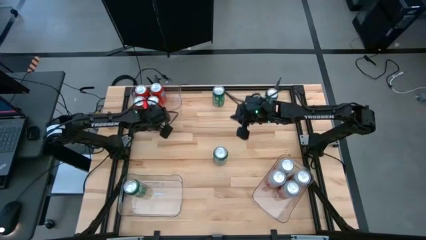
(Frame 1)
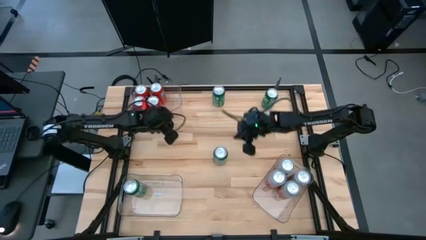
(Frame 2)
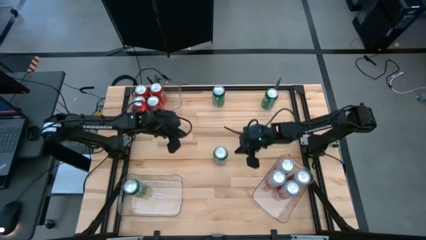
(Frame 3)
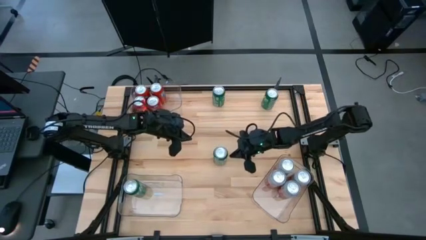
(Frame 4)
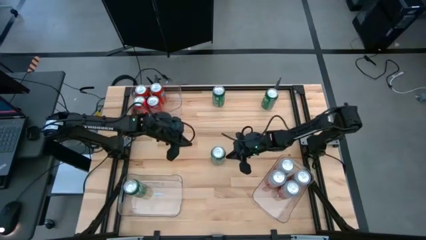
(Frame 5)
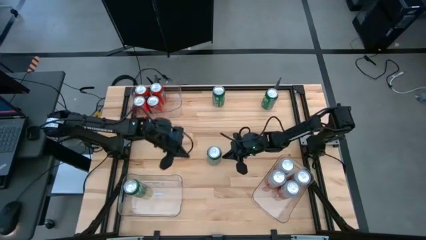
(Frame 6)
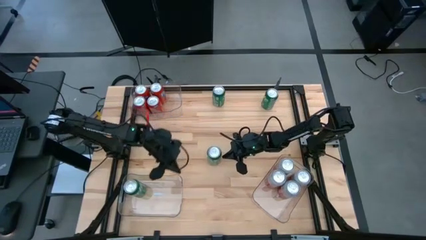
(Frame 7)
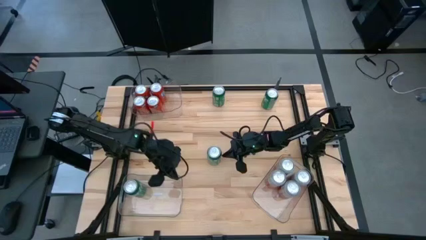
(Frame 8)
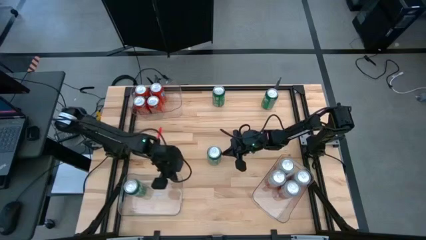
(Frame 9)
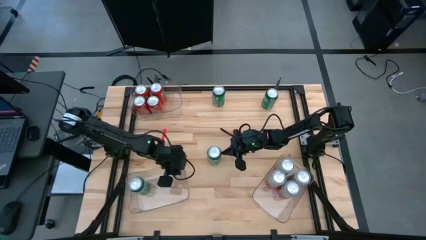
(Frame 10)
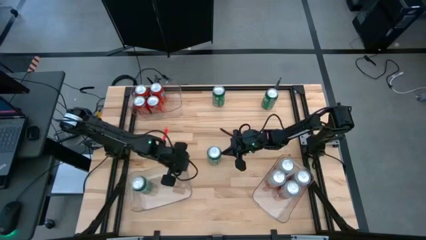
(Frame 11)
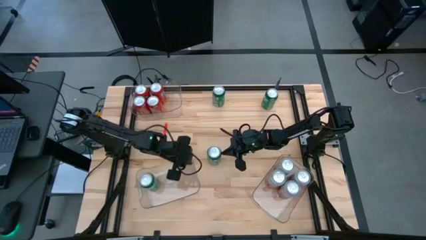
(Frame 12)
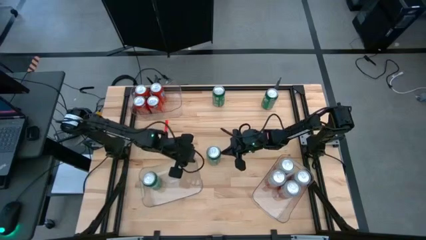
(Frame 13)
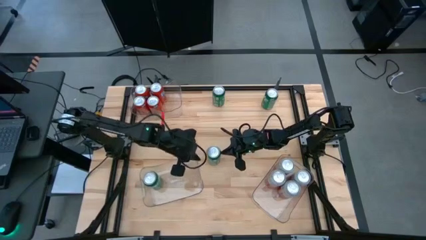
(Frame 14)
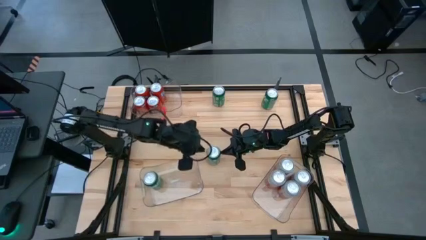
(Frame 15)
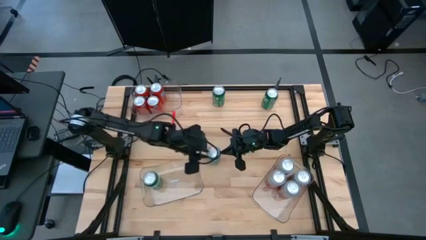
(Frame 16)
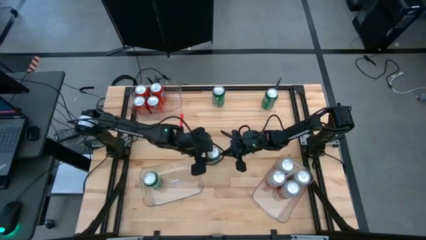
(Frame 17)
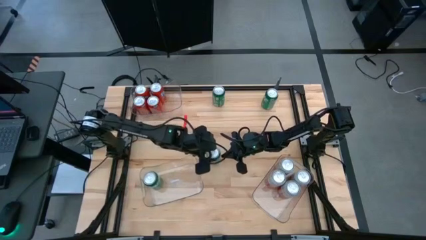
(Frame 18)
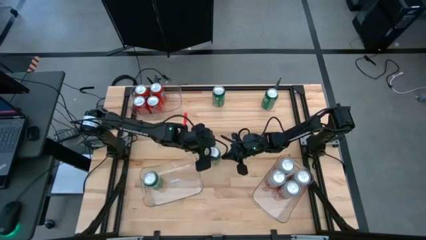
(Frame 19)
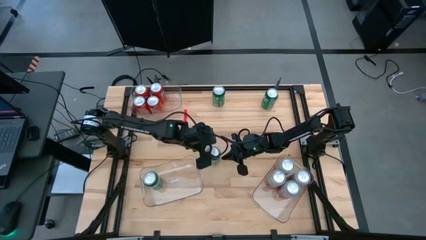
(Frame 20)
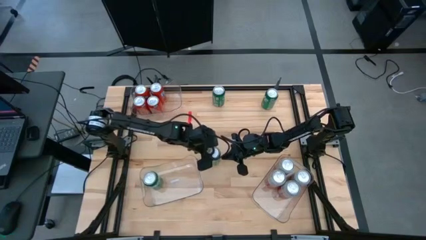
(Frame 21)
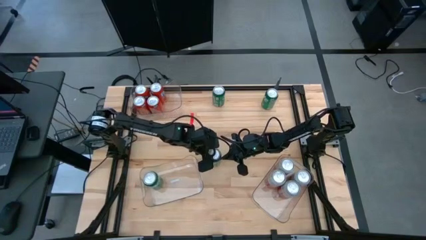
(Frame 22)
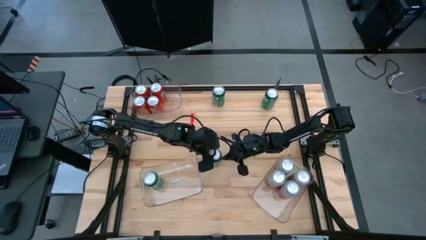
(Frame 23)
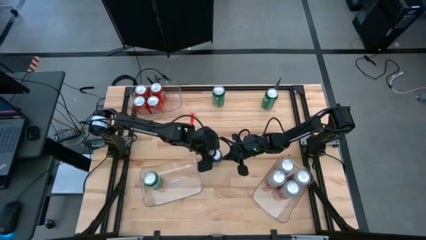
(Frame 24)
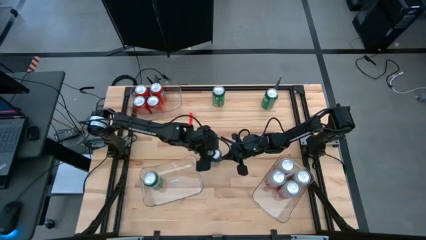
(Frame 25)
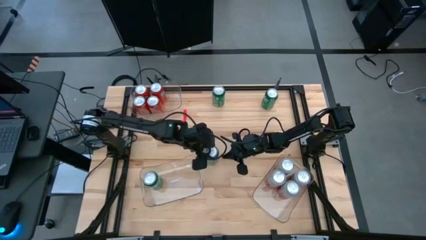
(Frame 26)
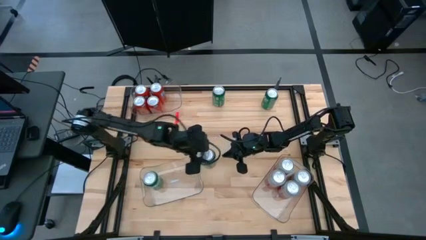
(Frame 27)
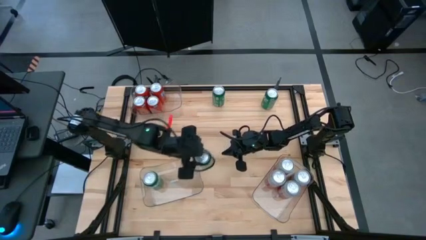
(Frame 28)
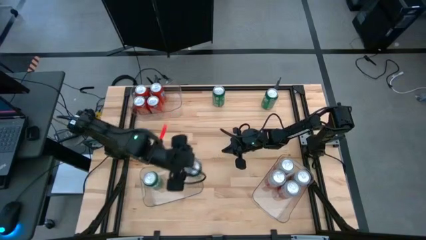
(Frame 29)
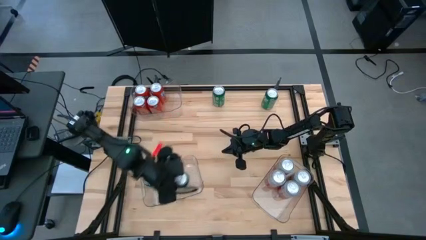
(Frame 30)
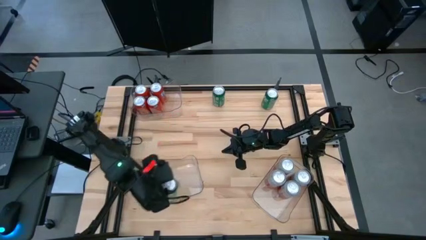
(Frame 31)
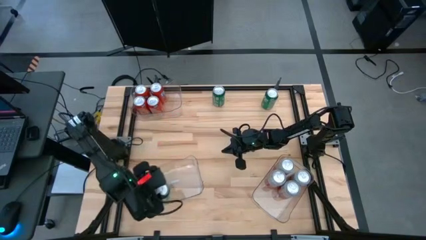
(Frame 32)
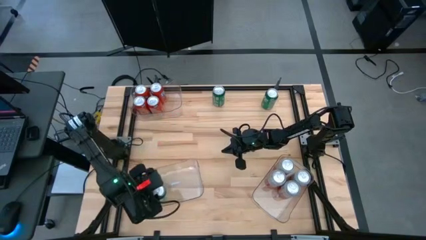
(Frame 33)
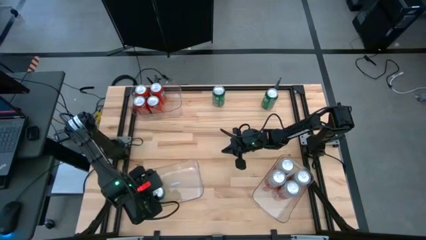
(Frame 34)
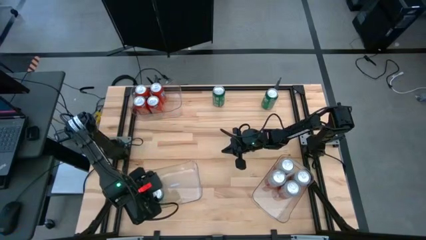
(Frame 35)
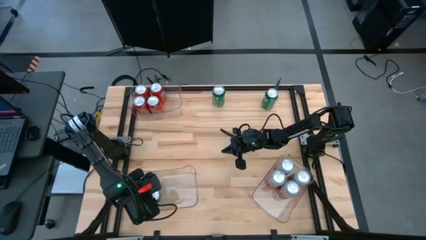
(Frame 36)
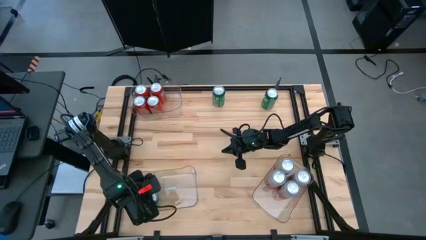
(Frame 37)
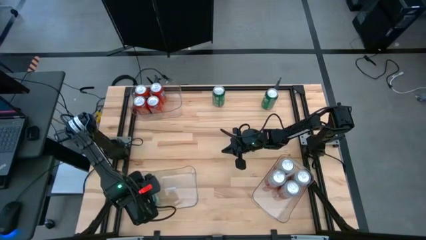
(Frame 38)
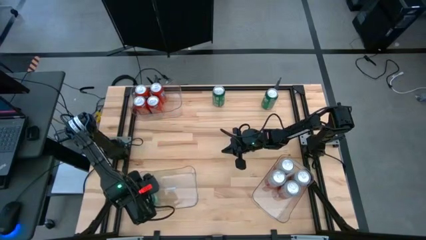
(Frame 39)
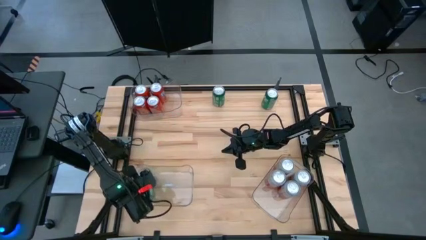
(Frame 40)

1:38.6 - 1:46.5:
Task: Sort soda cans
Put the green soda can into the bottom right transparent bin

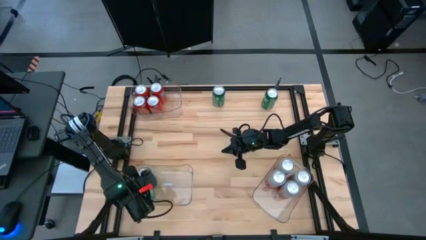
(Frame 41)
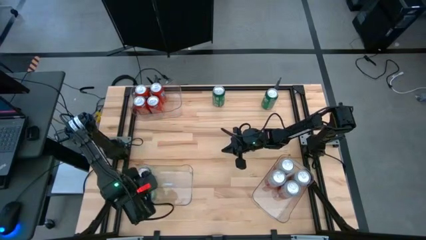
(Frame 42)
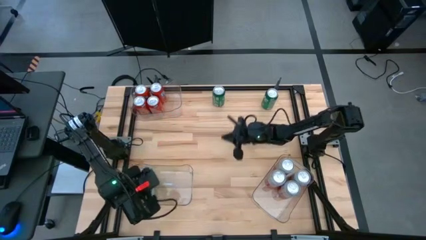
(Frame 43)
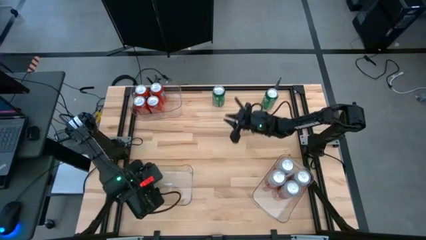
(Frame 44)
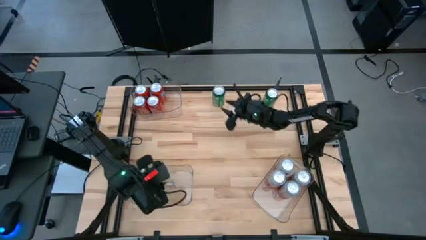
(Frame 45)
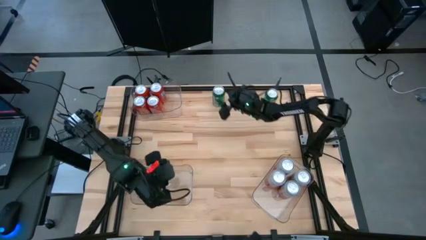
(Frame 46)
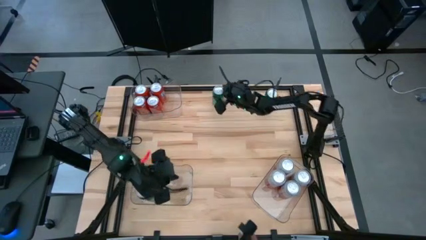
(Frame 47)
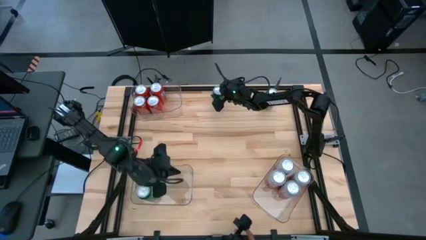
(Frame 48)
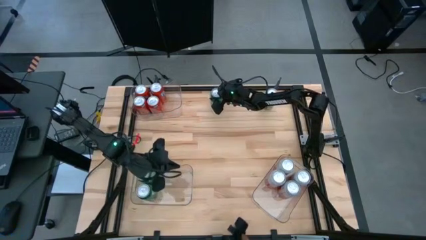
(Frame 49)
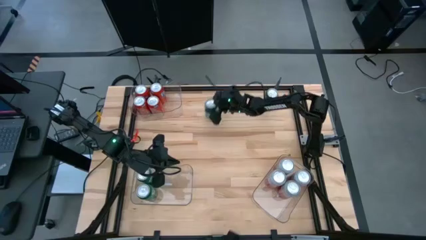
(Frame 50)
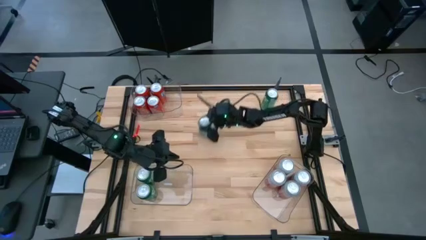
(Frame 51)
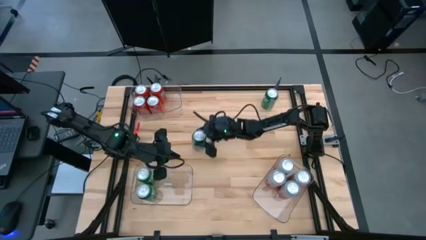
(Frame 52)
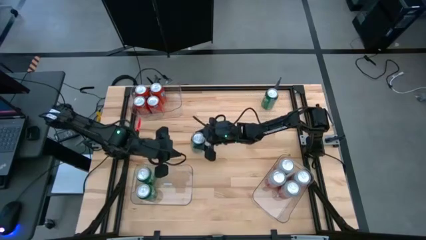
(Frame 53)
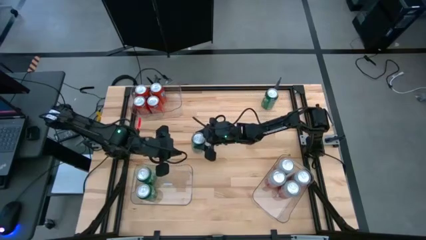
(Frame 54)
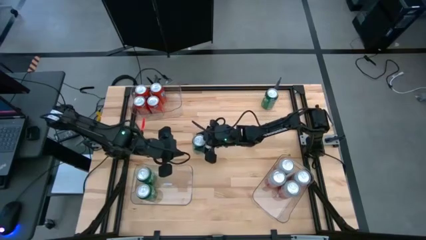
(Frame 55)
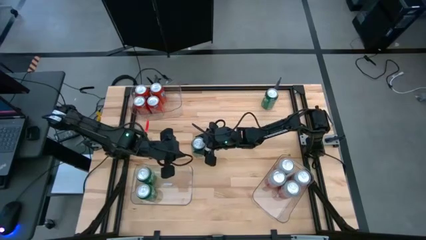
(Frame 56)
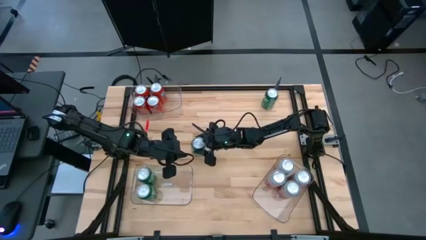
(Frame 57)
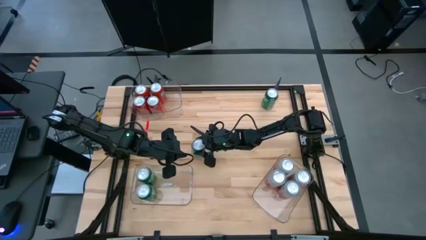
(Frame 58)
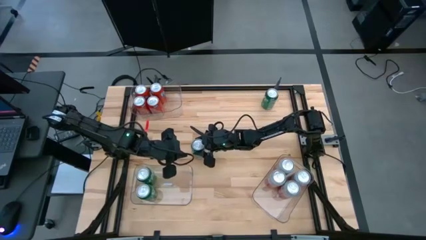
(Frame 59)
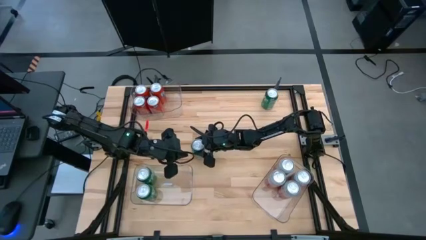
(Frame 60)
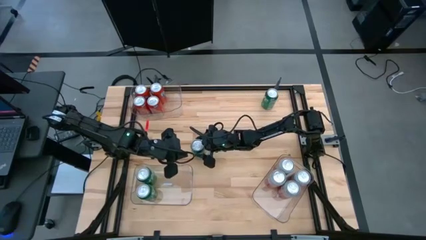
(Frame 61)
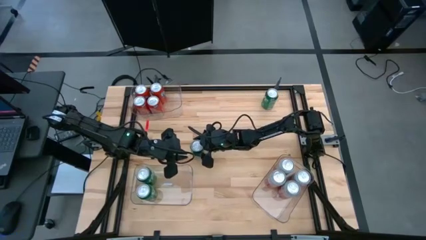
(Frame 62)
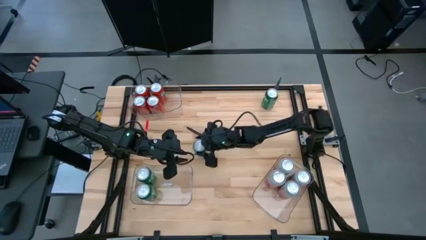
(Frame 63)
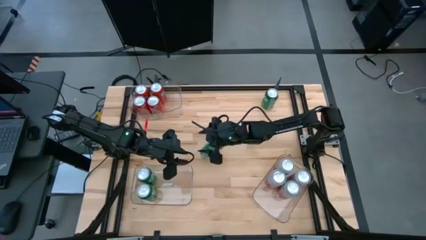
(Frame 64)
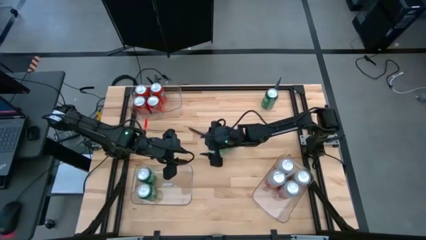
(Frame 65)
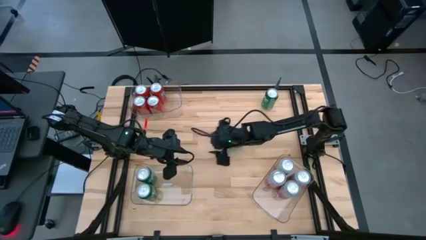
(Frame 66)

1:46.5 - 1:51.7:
Put the green soda can into the bottom right transparent bin
